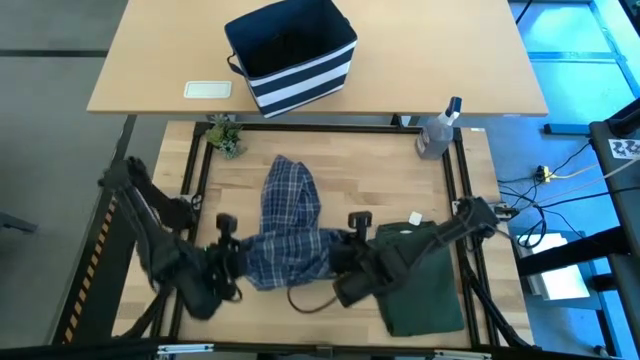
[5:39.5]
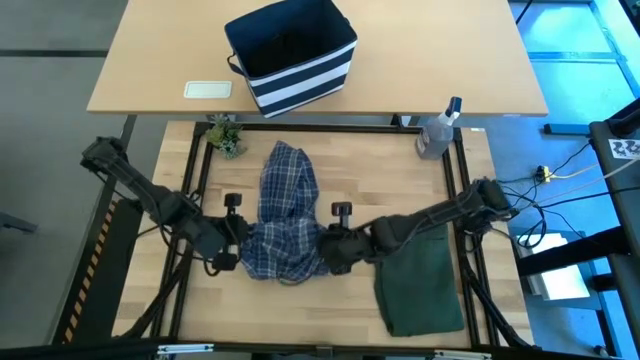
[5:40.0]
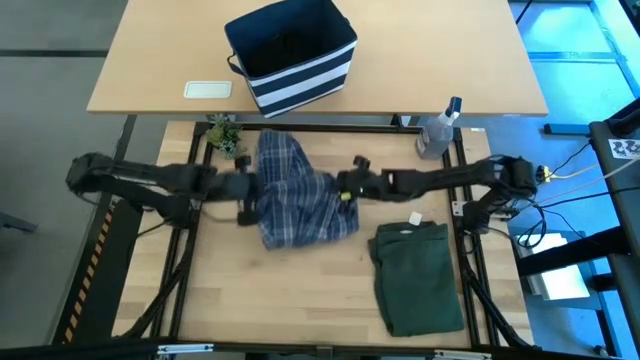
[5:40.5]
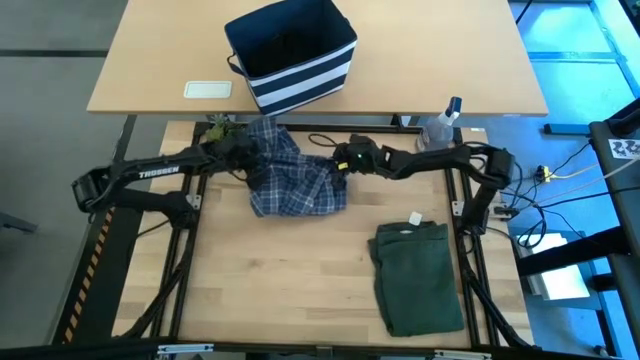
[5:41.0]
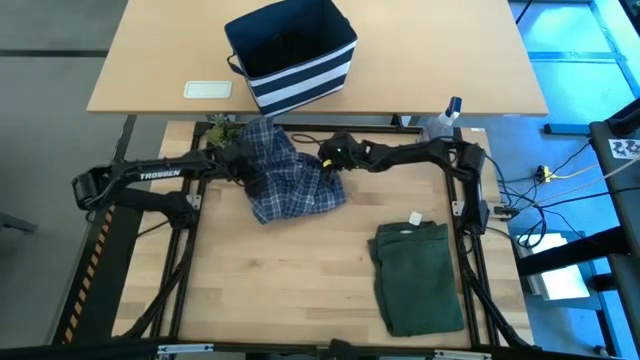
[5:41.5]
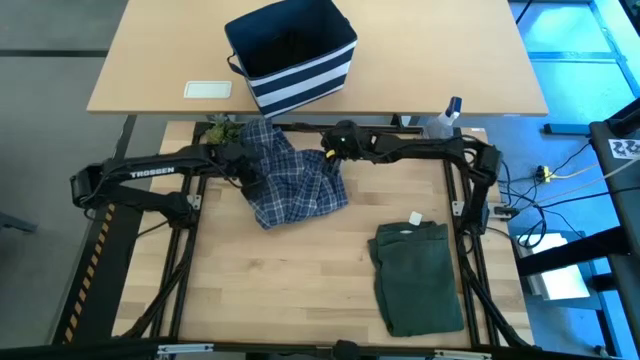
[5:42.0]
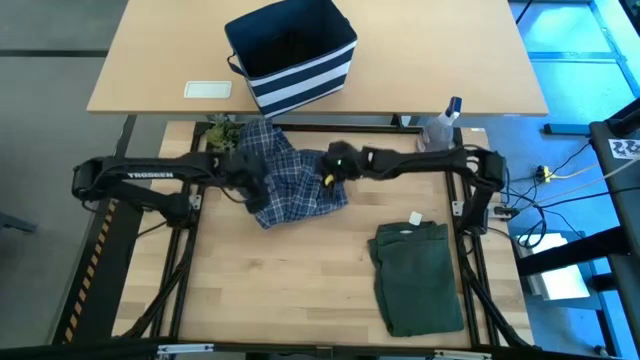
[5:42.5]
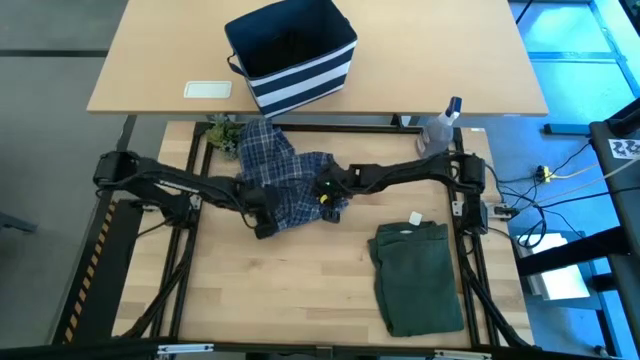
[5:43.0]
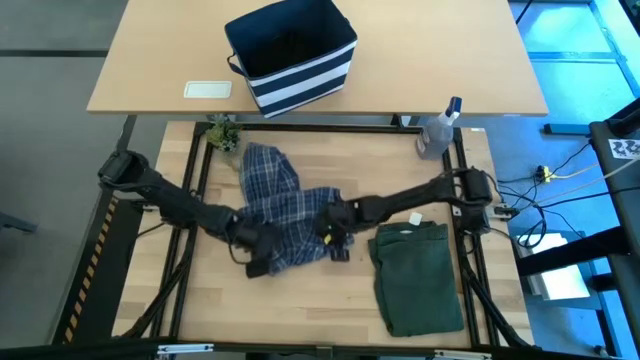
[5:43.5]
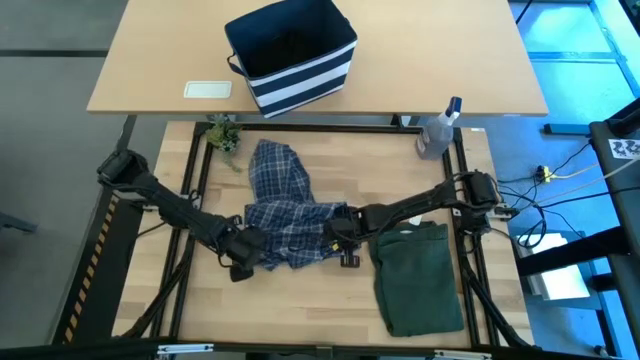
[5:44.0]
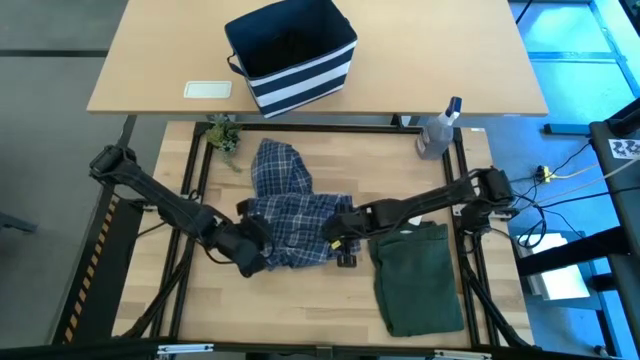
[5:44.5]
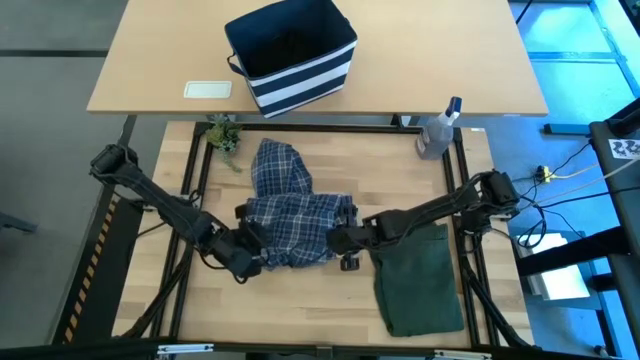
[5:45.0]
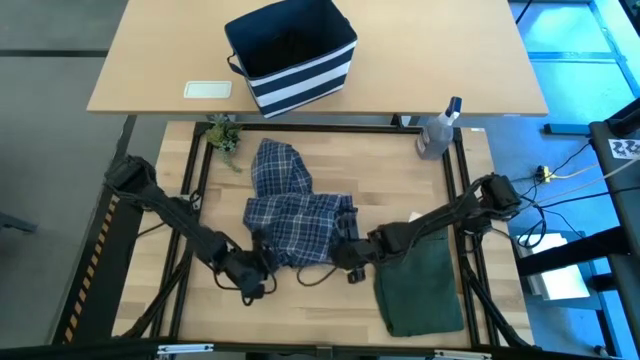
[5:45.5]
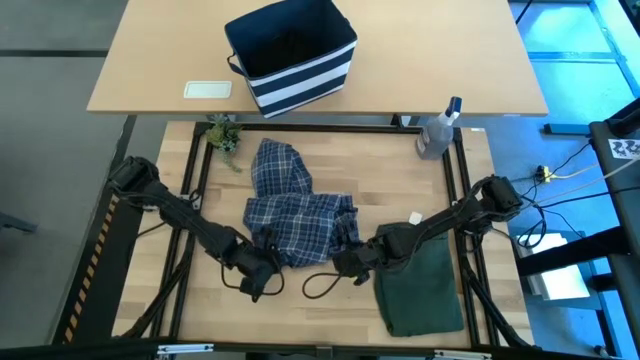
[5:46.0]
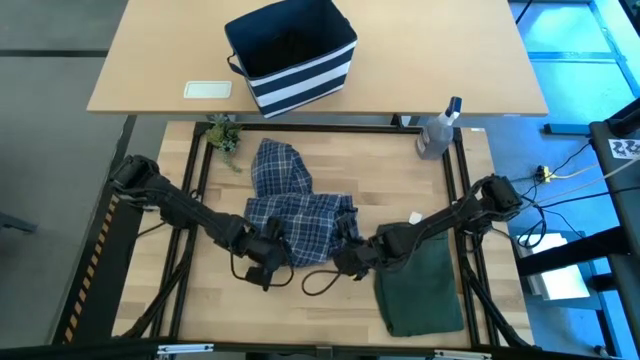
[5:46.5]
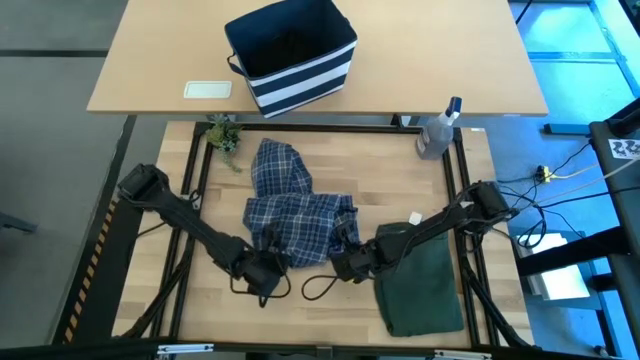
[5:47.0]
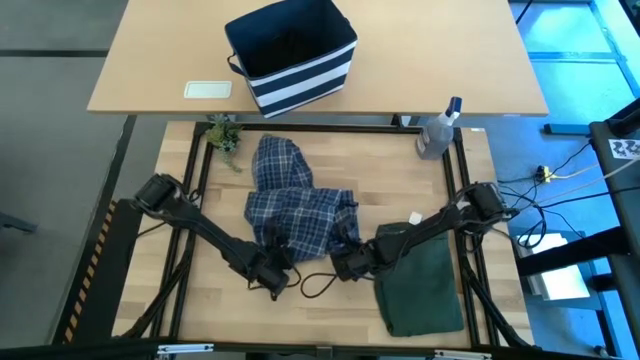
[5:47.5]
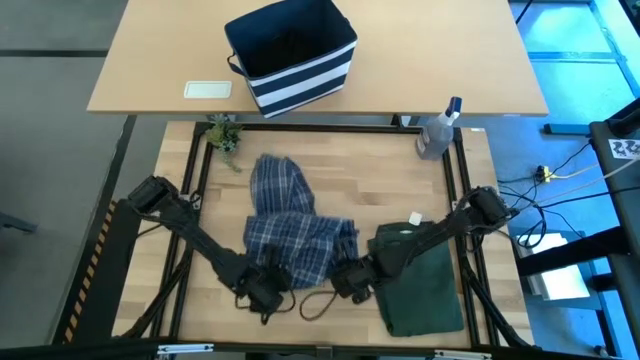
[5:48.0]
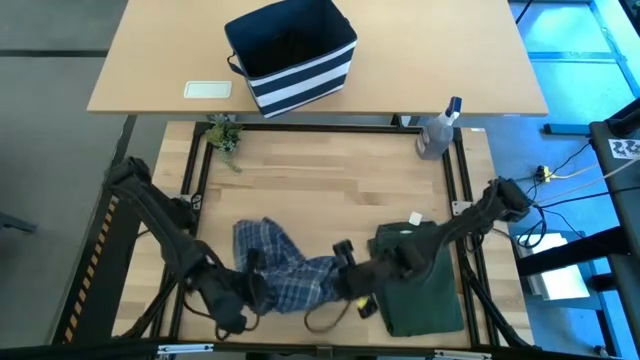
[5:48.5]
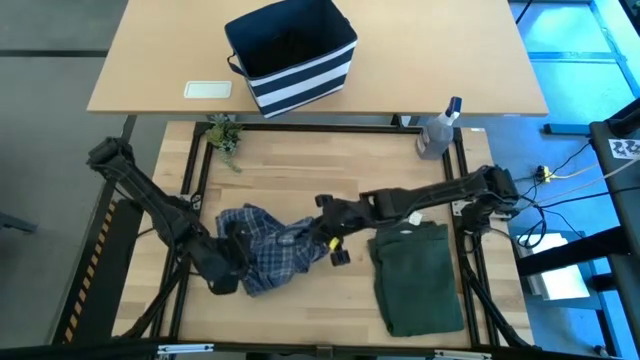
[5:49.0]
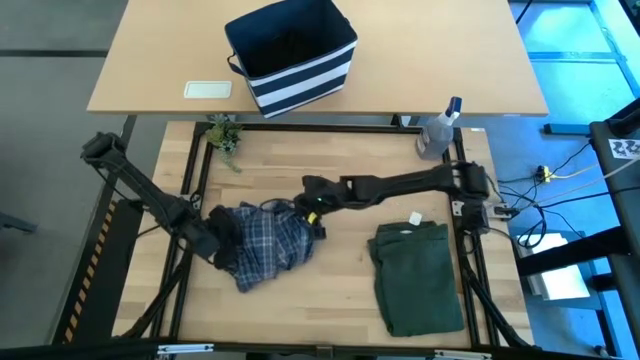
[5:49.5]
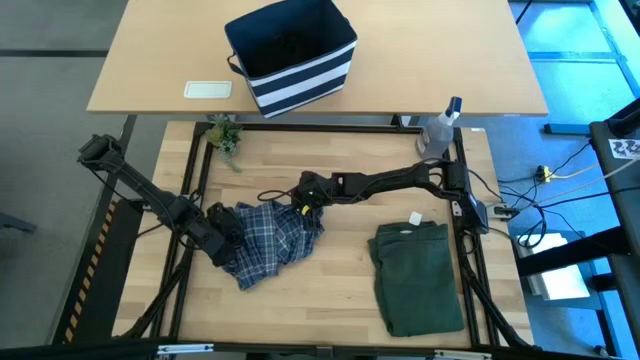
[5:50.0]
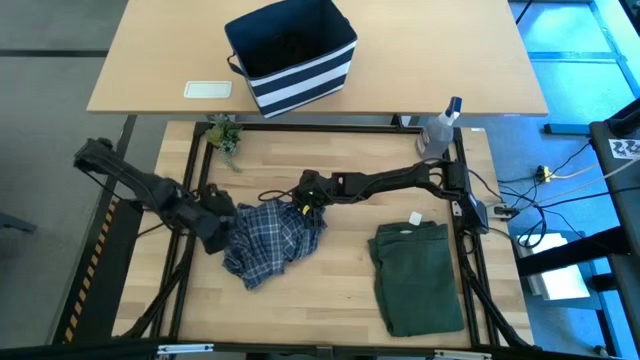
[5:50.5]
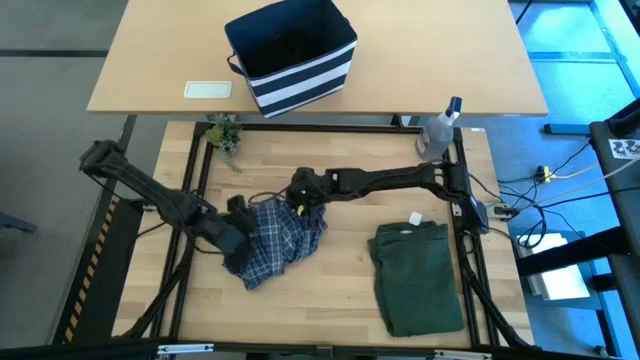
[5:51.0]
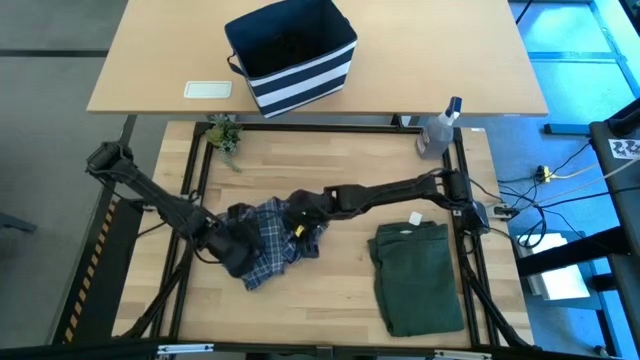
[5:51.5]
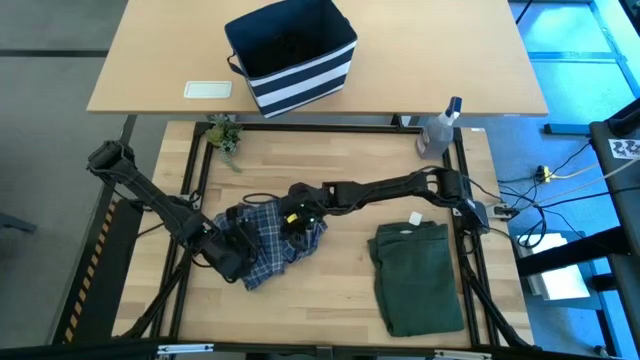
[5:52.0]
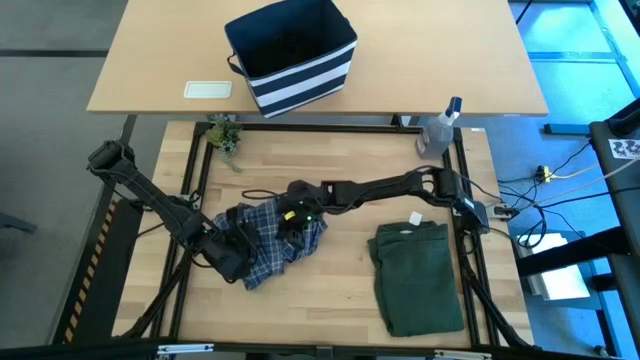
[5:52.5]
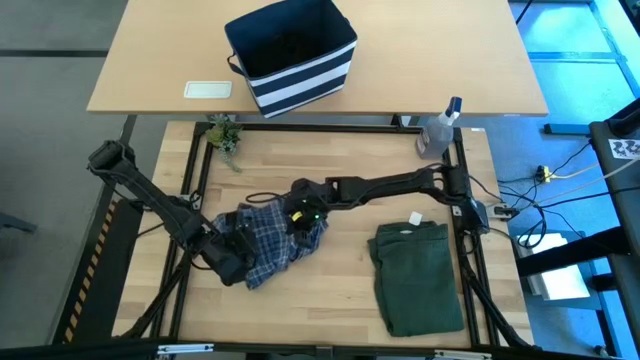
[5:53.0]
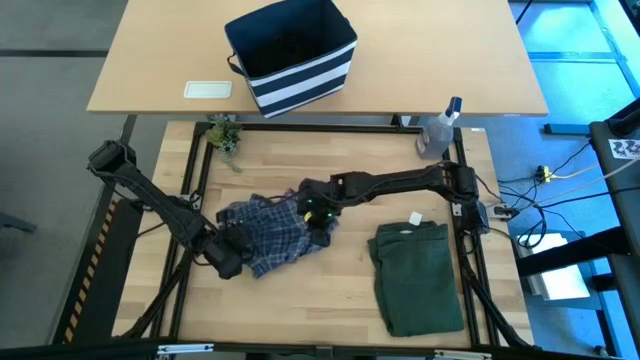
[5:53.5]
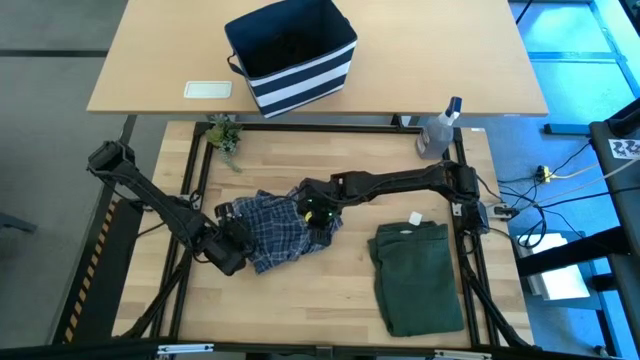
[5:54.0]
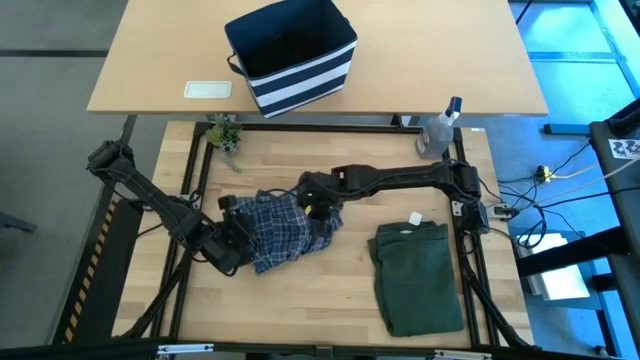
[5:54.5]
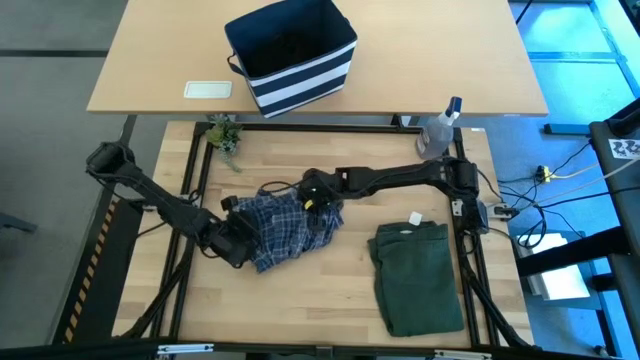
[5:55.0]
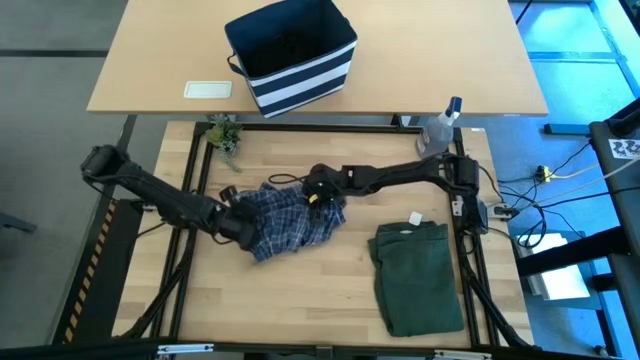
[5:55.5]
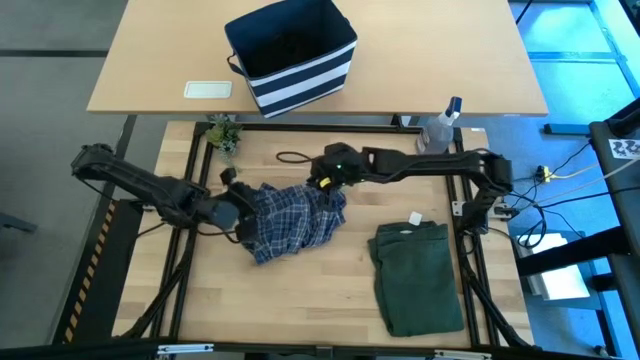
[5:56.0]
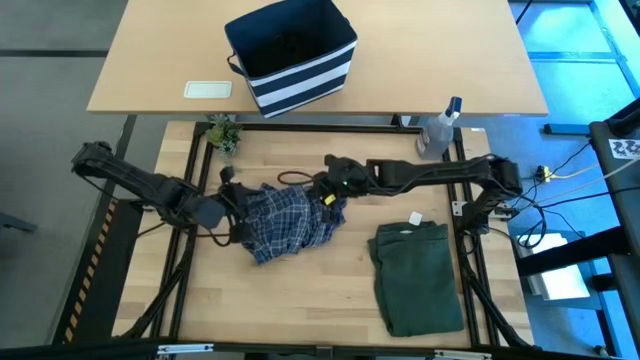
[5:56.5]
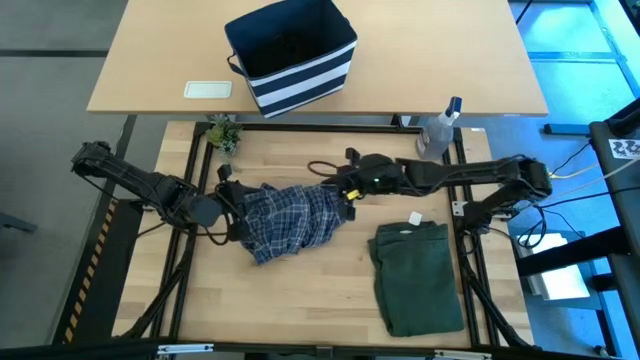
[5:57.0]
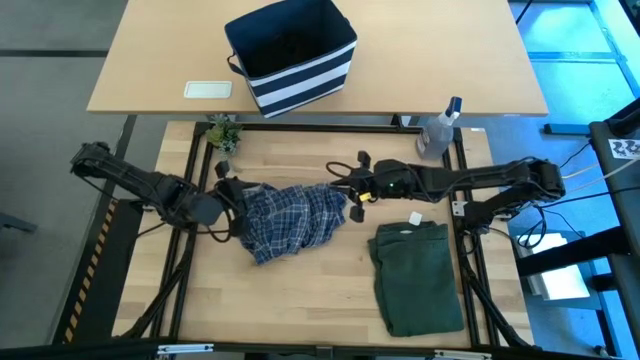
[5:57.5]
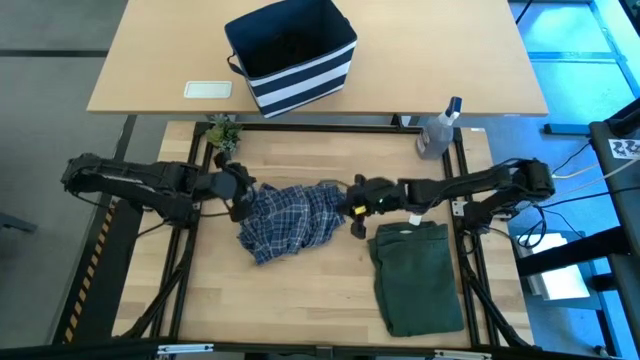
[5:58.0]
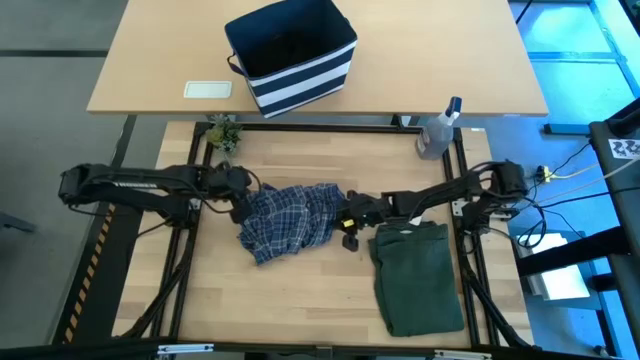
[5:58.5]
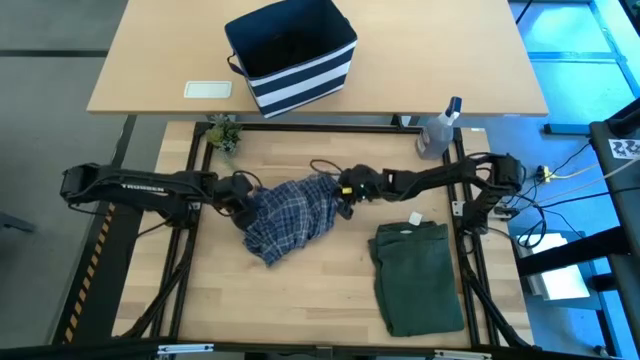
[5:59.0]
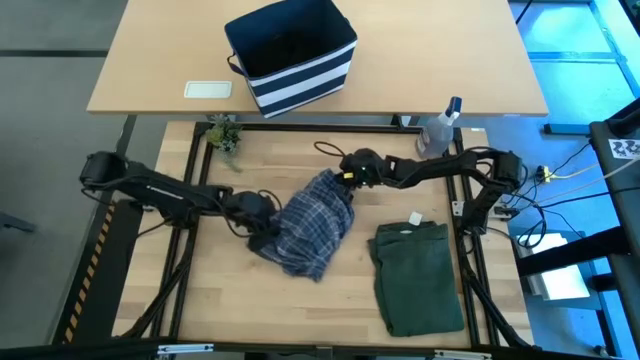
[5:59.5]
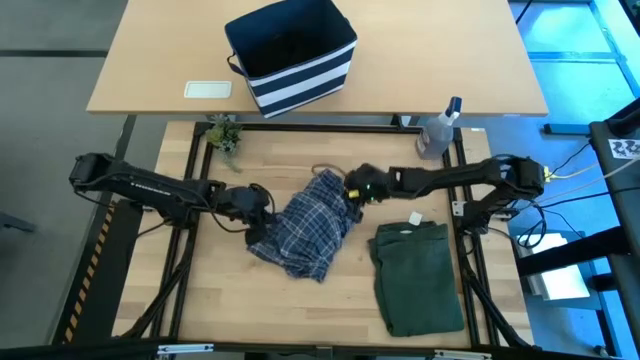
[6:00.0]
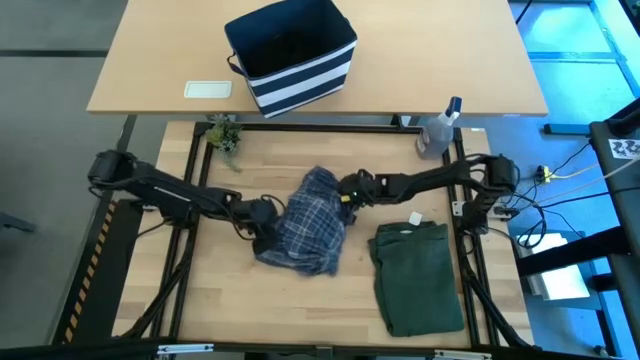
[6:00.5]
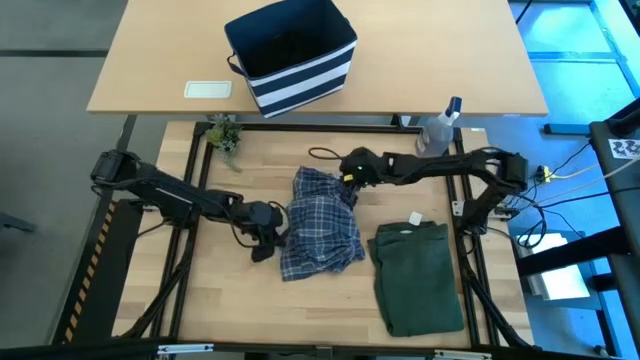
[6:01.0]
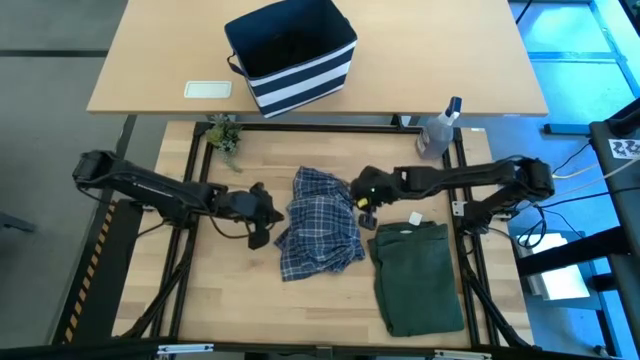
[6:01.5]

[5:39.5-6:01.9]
Task: Fold Laundry from Bin
Fold the blue checkered pants
